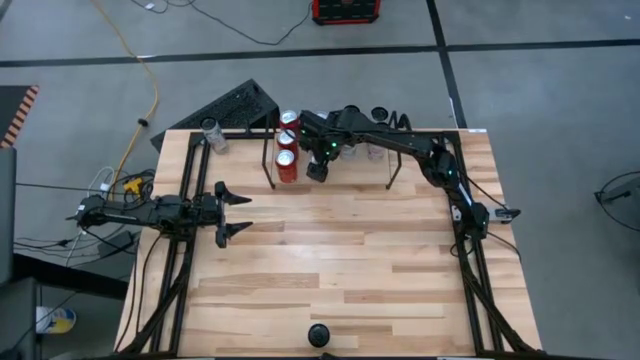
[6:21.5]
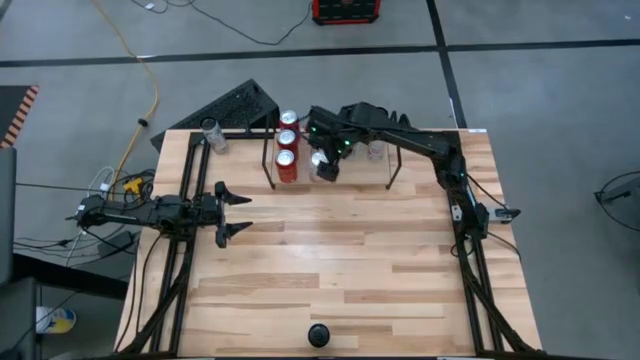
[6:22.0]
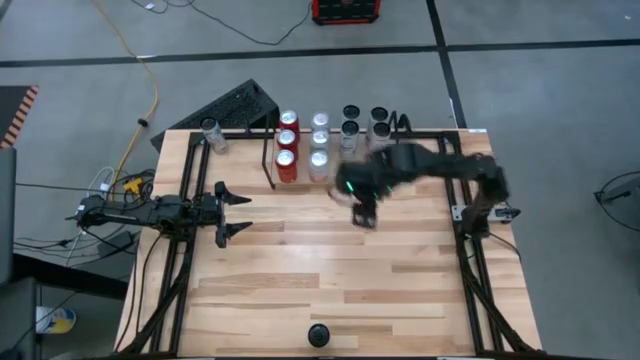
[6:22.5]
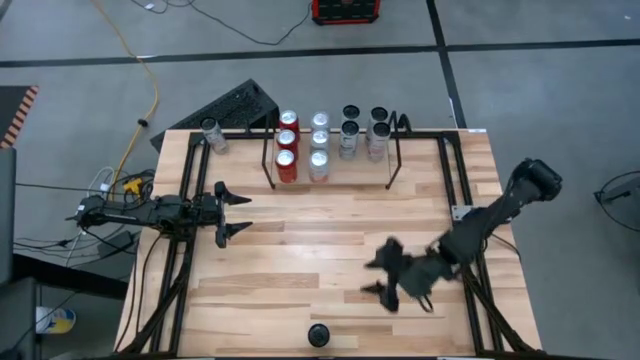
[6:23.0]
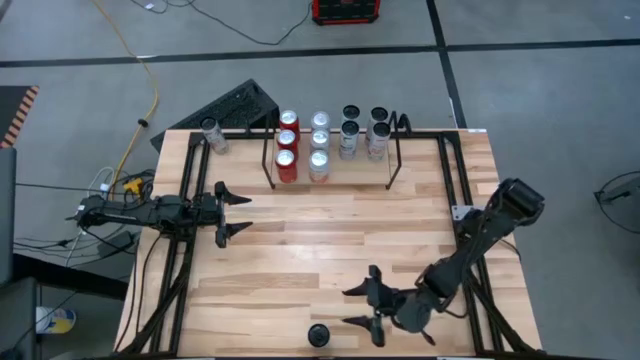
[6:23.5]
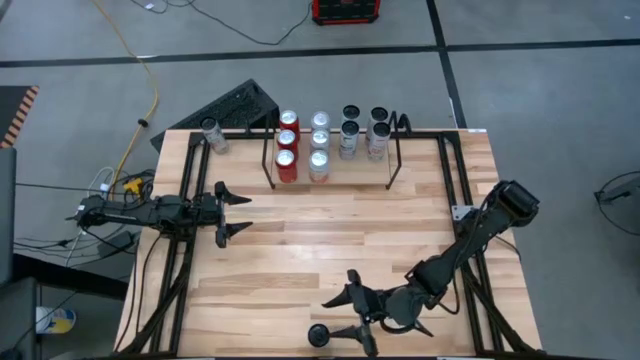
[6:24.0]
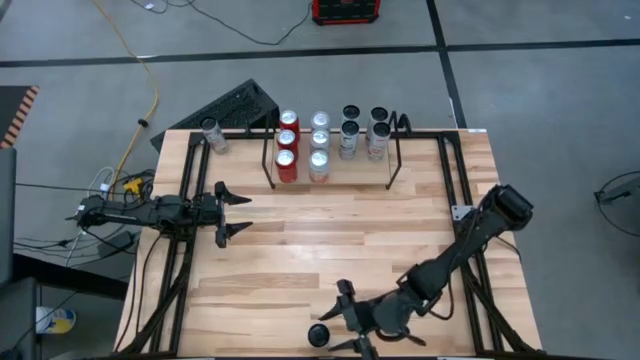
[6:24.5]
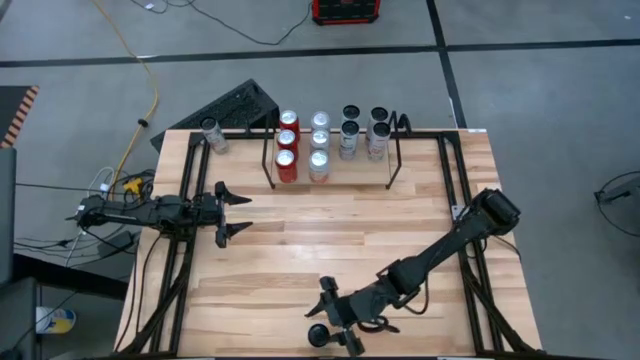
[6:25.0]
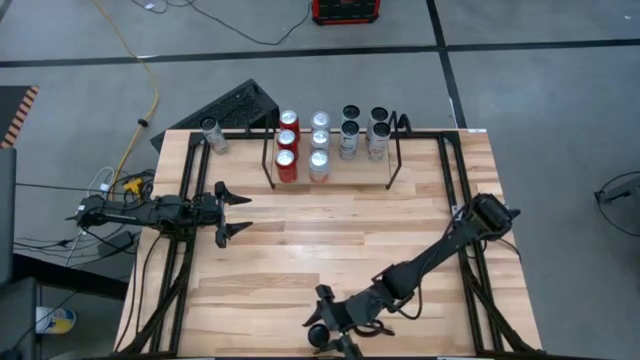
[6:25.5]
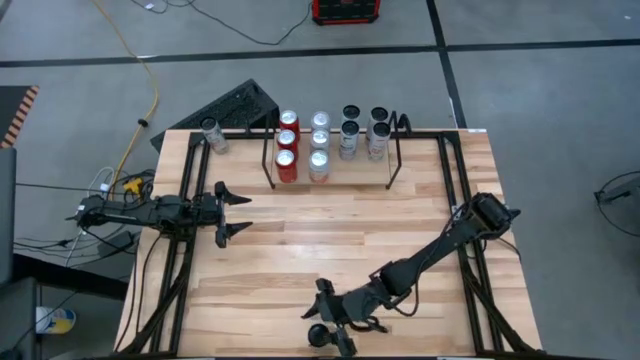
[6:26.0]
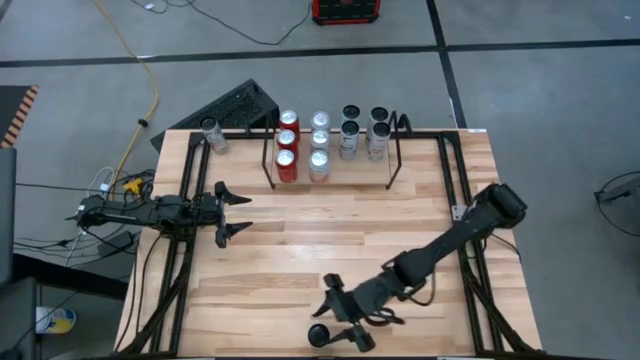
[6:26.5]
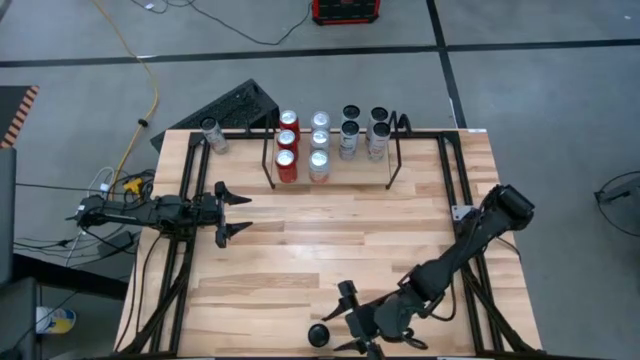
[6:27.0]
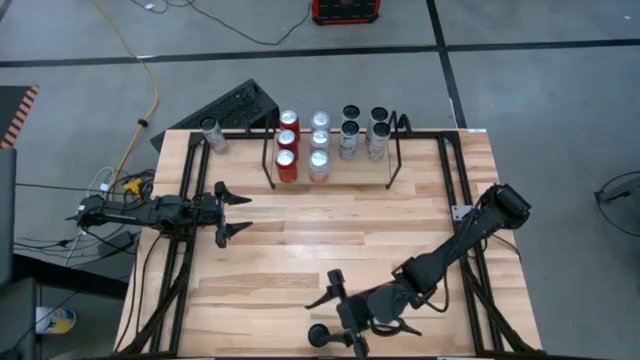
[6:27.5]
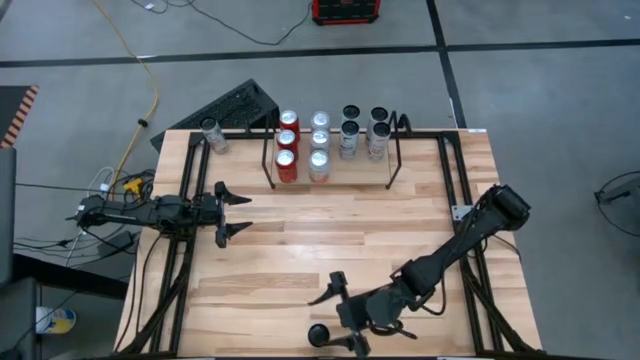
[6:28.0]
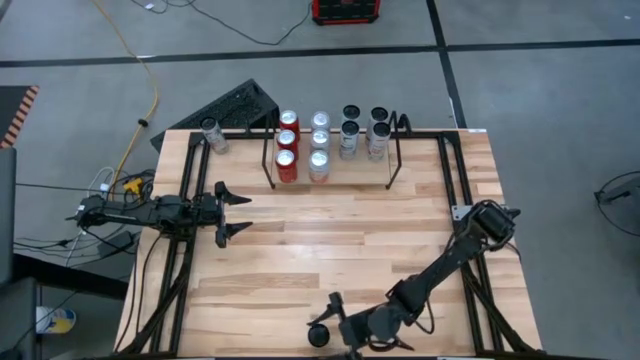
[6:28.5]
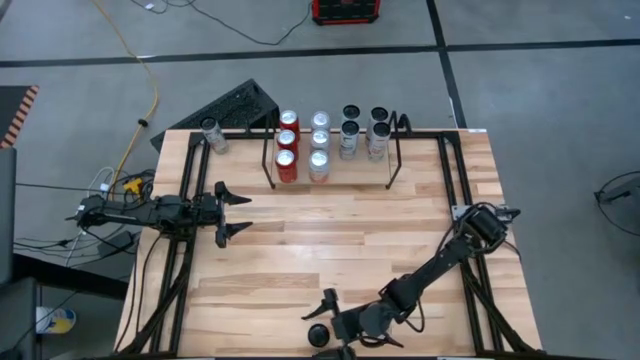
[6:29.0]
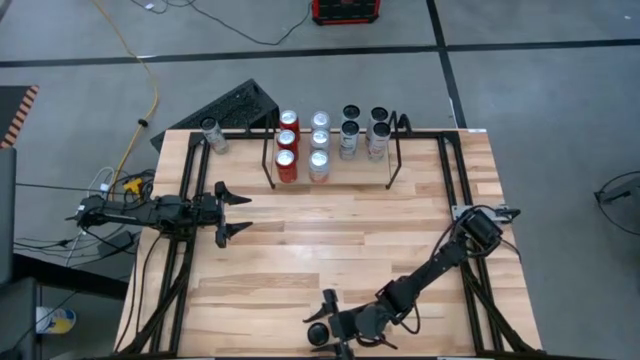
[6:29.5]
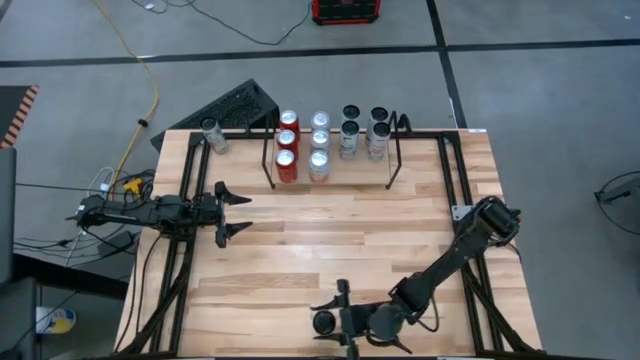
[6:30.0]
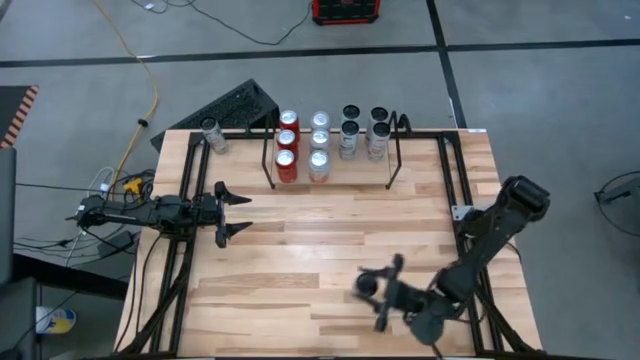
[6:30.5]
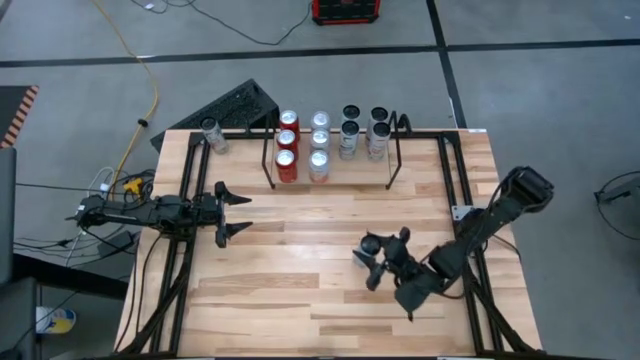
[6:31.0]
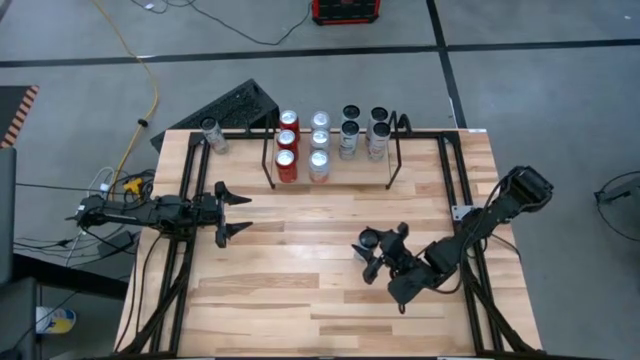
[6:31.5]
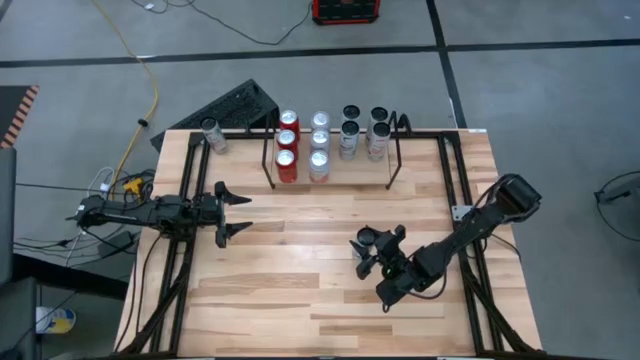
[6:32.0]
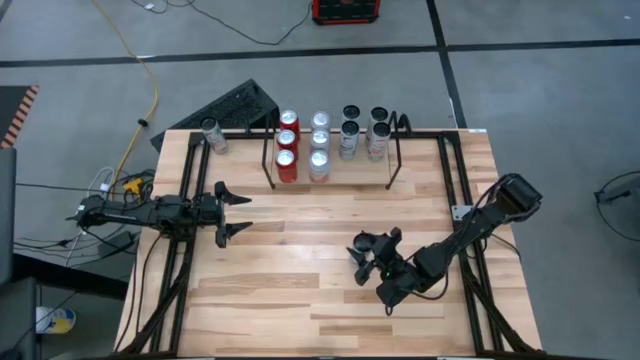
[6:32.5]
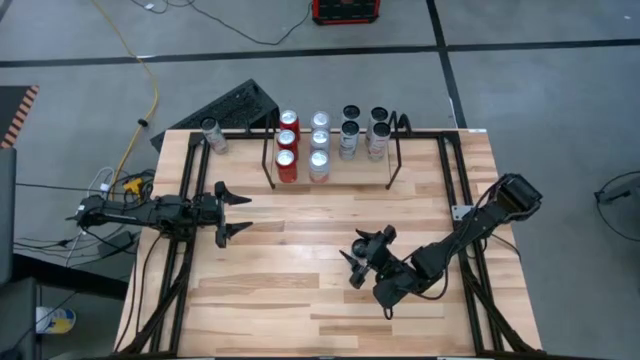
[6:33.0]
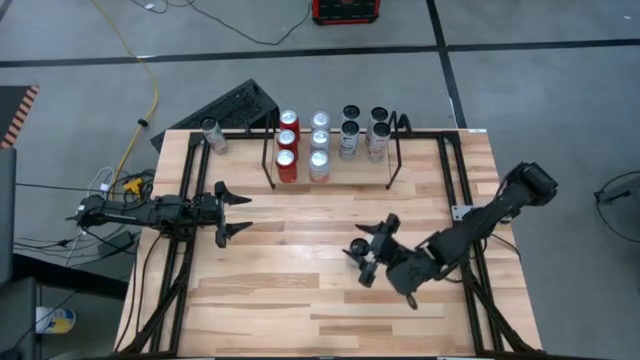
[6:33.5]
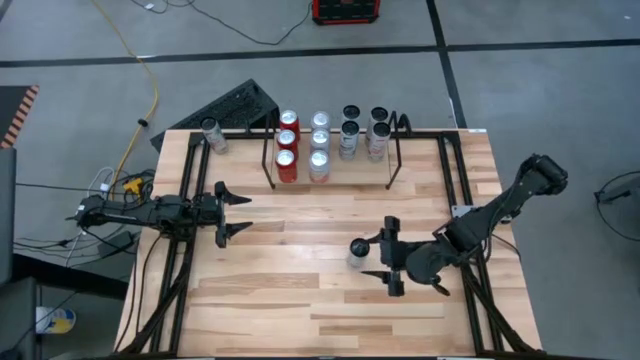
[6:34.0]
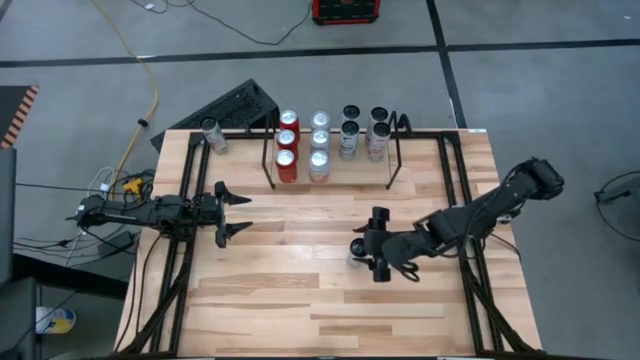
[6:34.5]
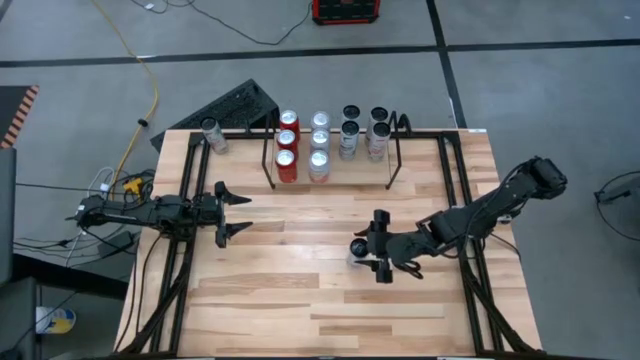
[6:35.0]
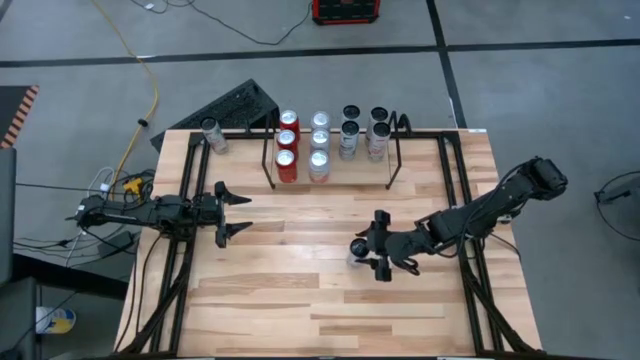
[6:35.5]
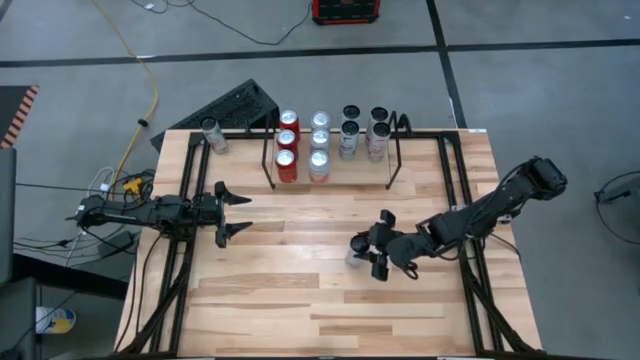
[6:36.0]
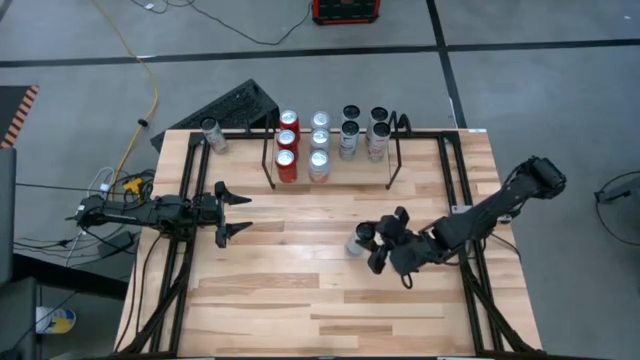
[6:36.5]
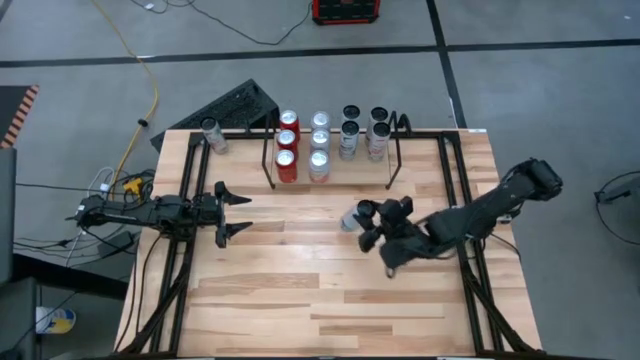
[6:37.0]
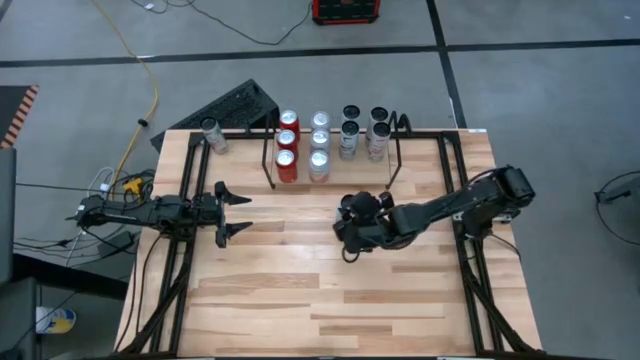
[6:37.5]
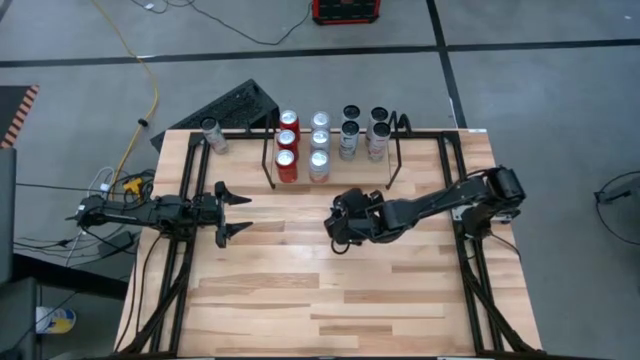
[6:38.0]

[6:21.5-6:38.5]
Task: Place canned beverage on shelf
Put the white blue soda can on the shelf aligned with the other white blue soda cans
